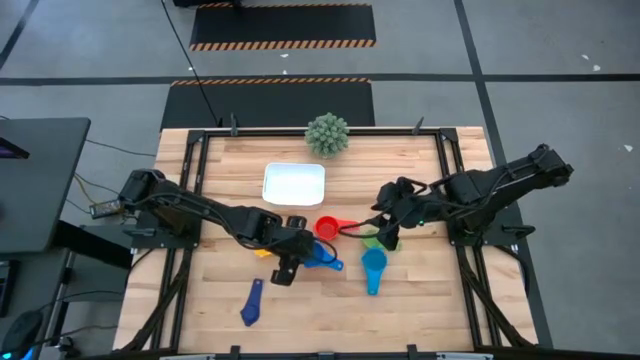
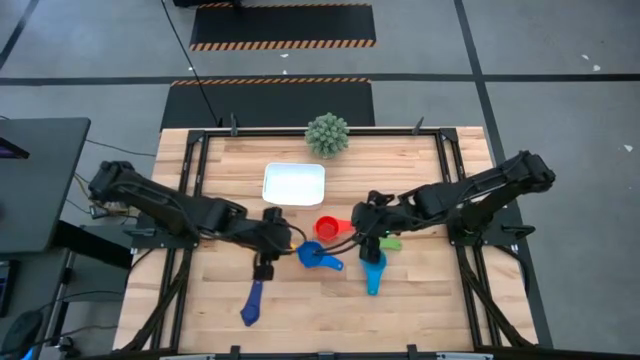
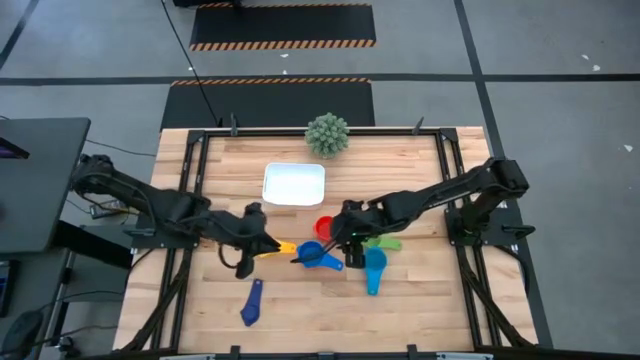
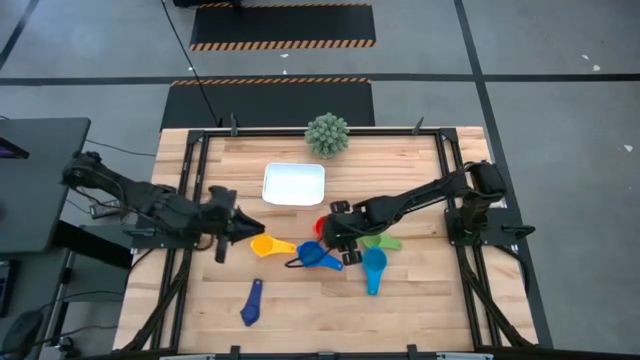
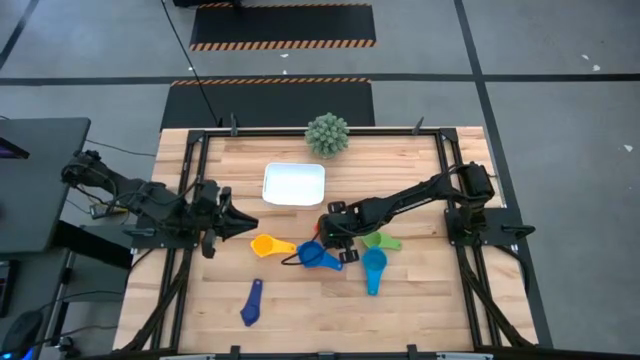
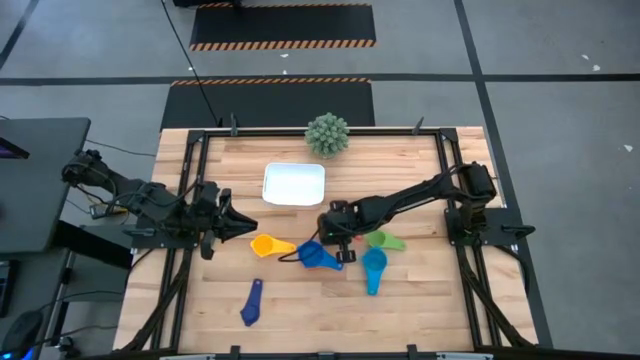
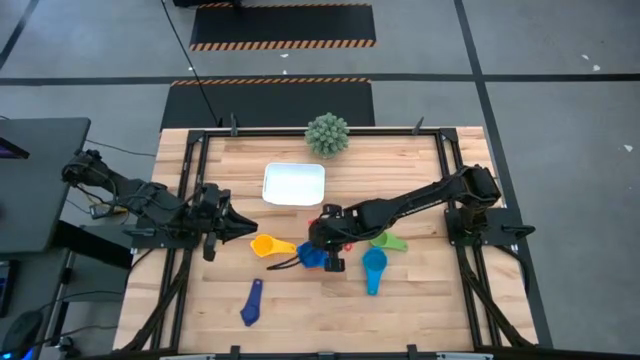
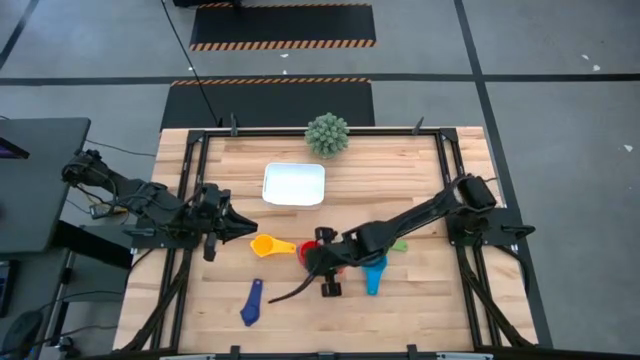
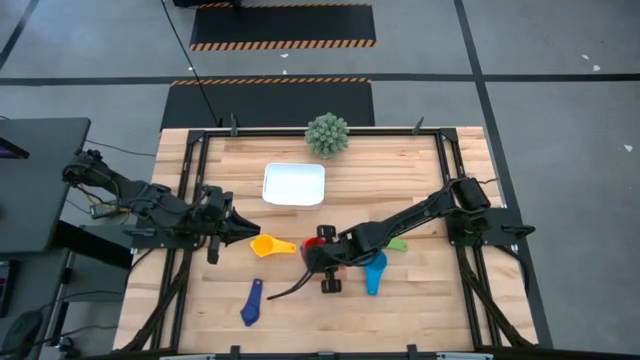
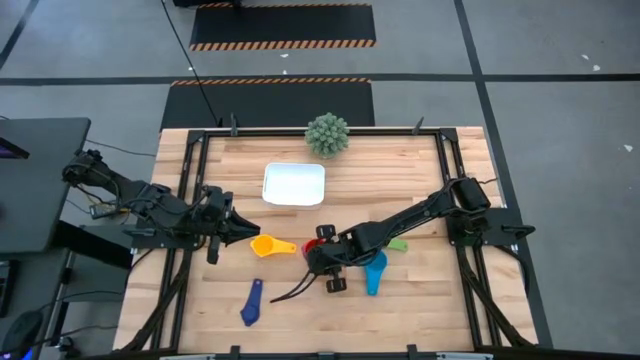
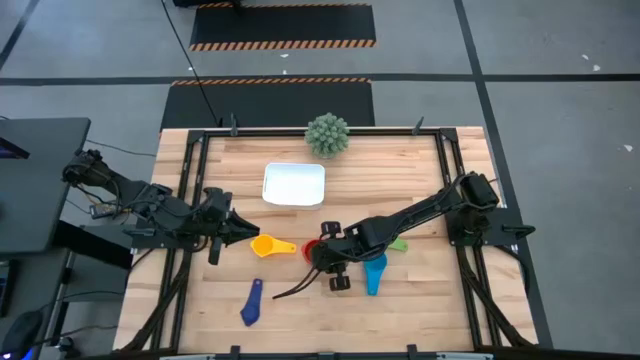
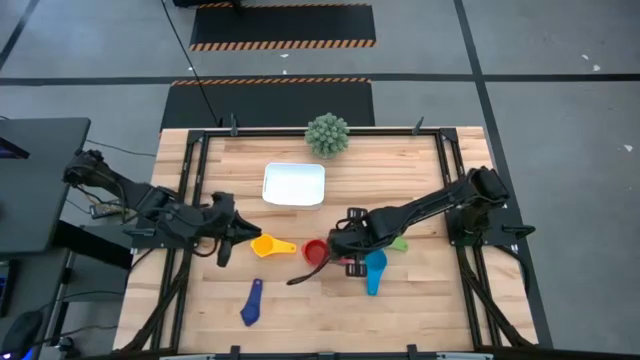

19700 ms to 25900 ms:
Task: Nest measuring cups in basket
Stack the red measuring cup on top of the light blue measuring cup

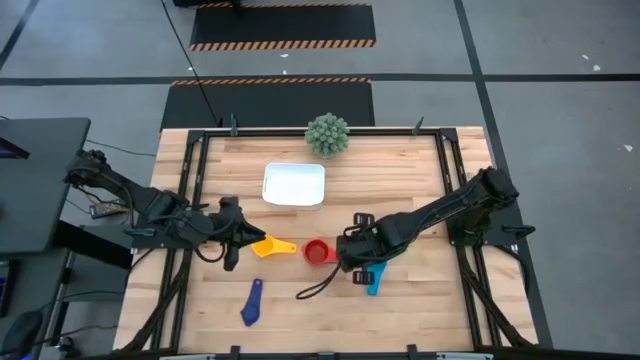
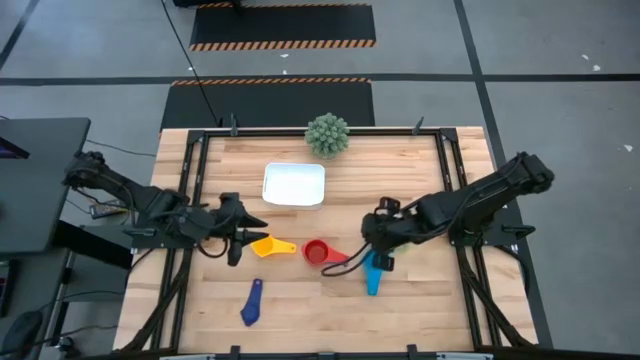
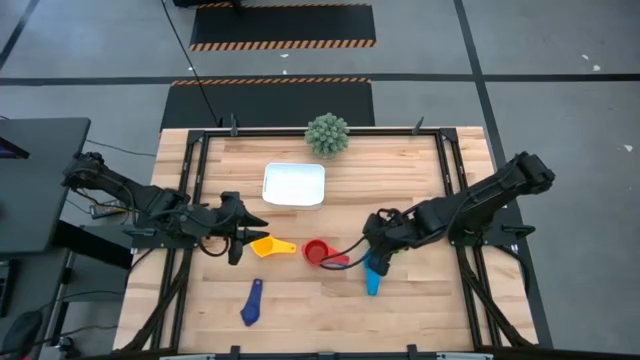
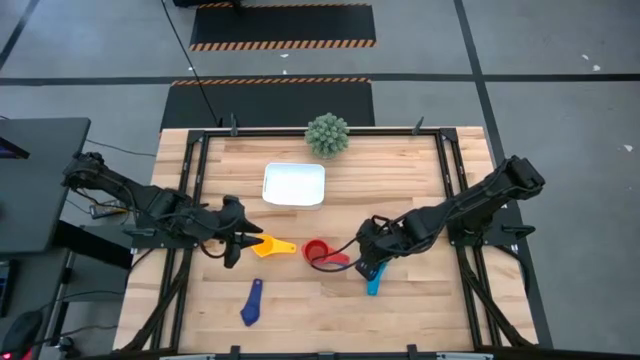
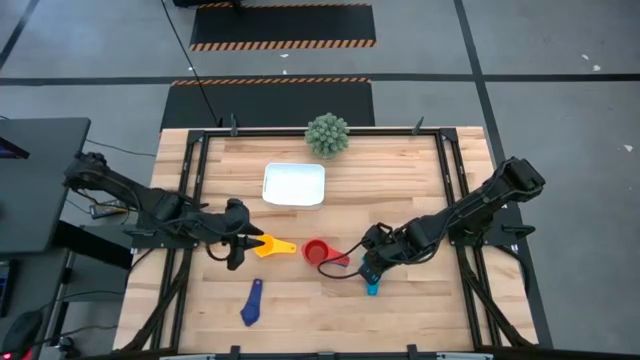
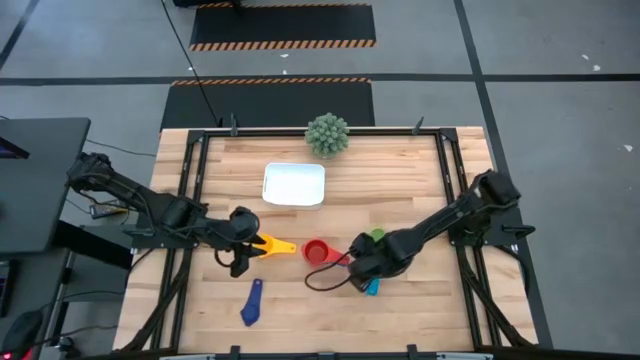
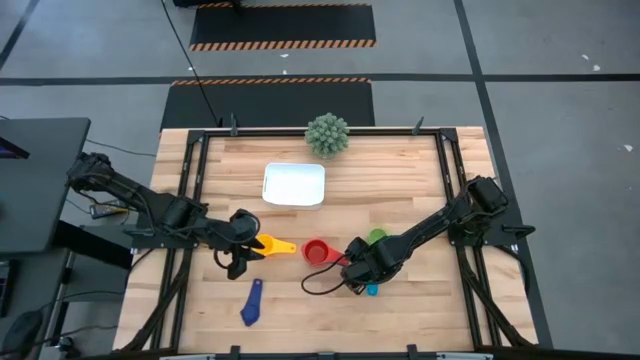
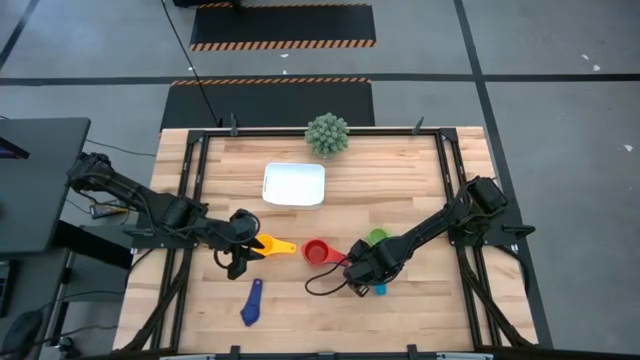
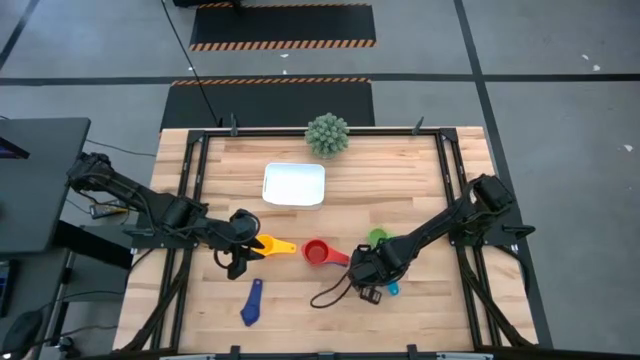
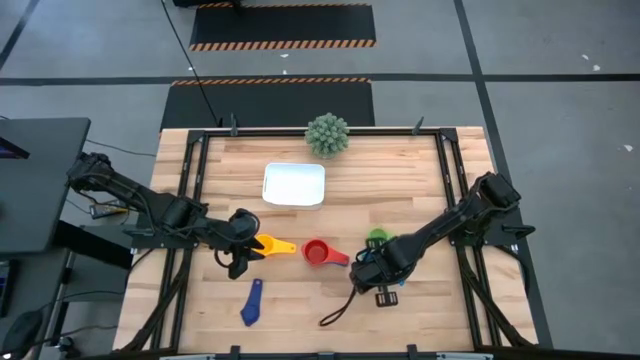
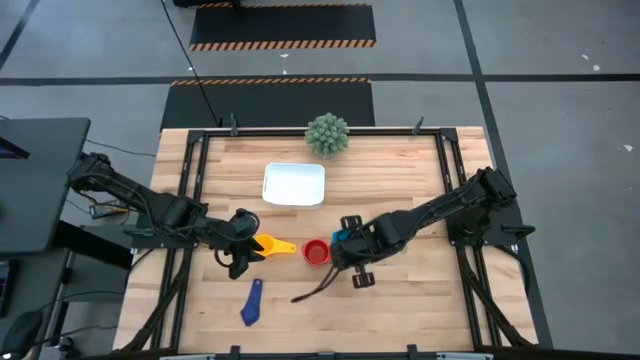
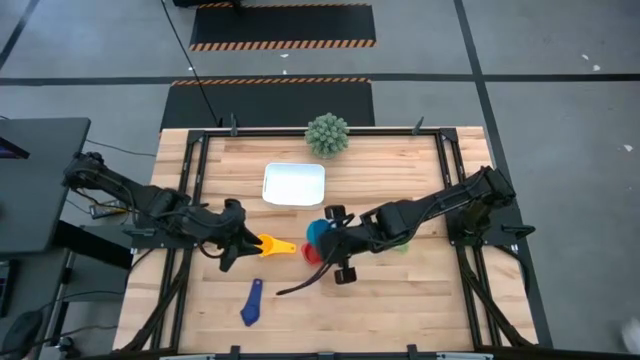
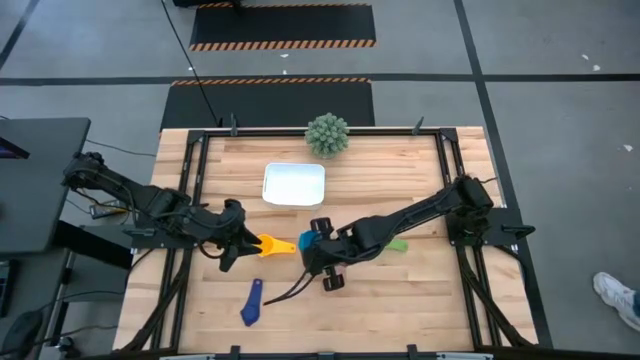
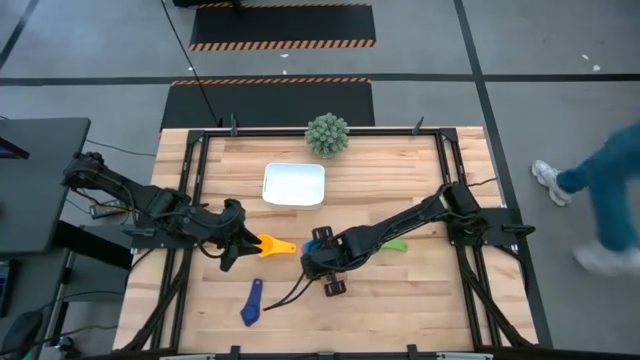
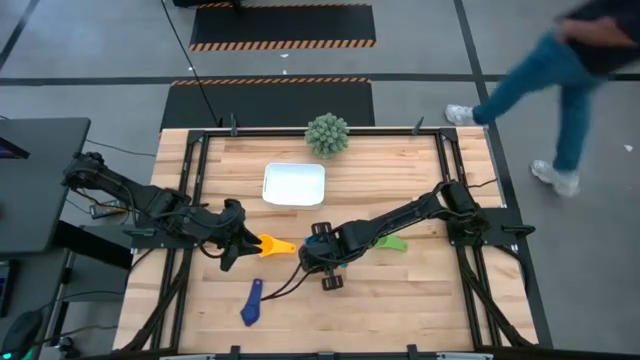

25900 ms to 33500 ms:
Stack the light blue measuring cup on top of the red measuring cup

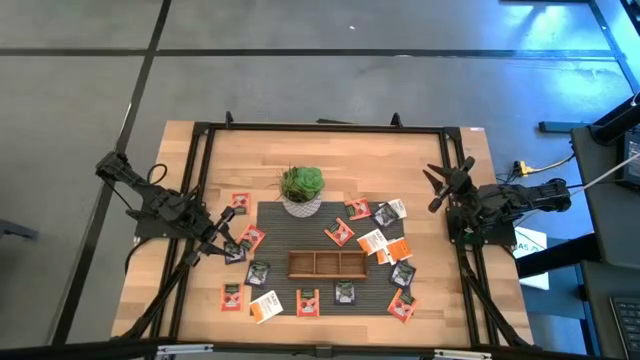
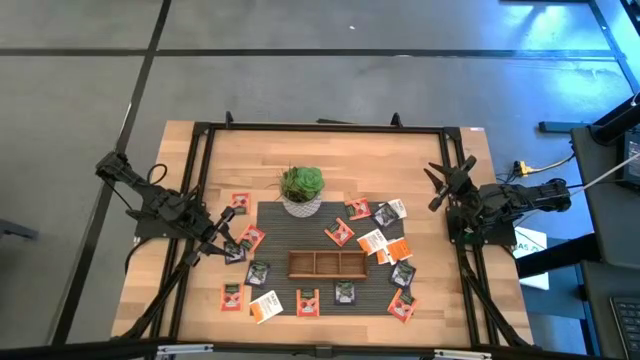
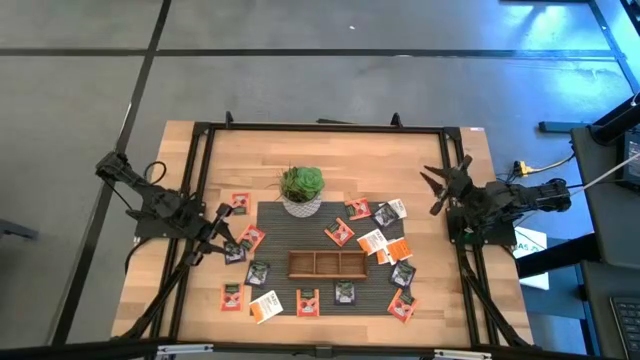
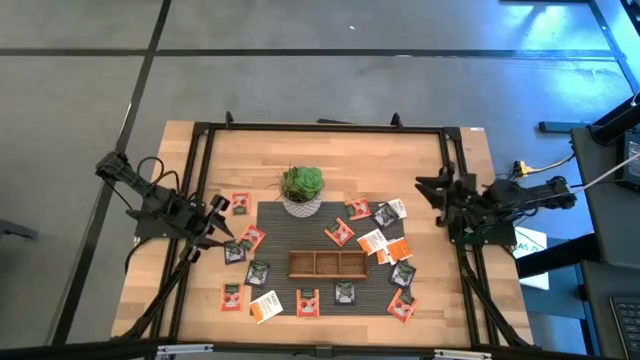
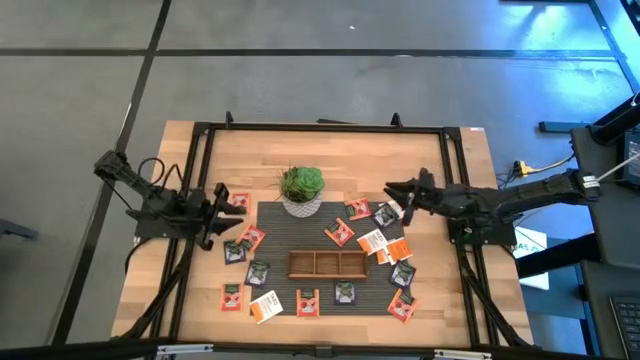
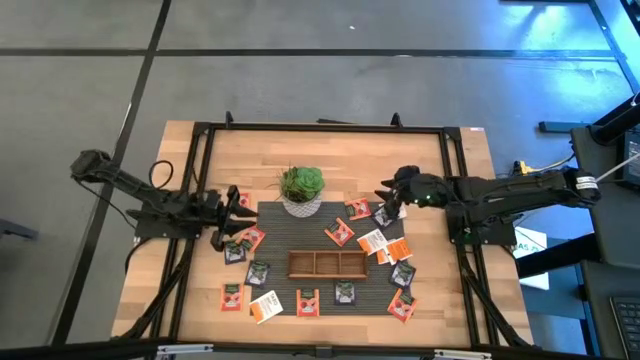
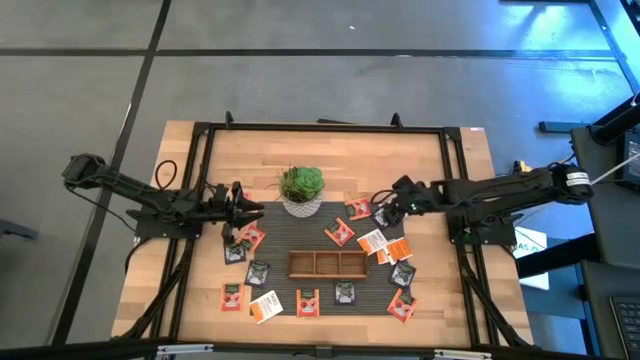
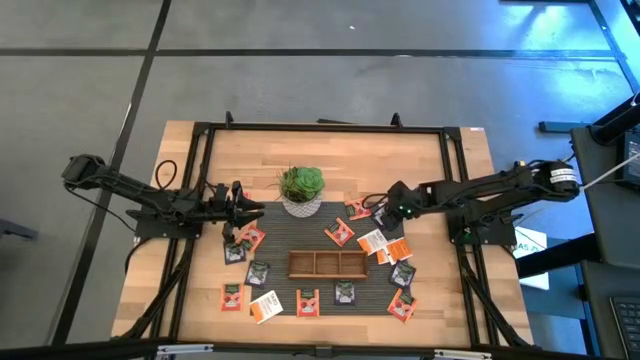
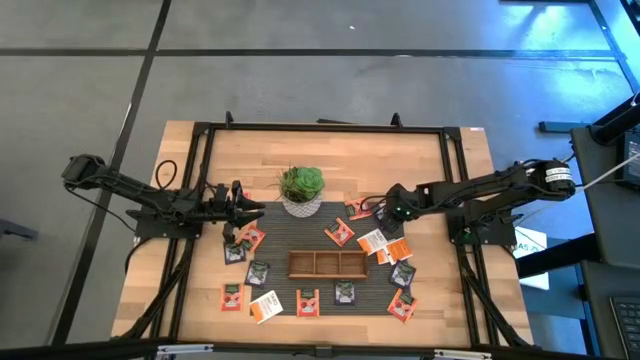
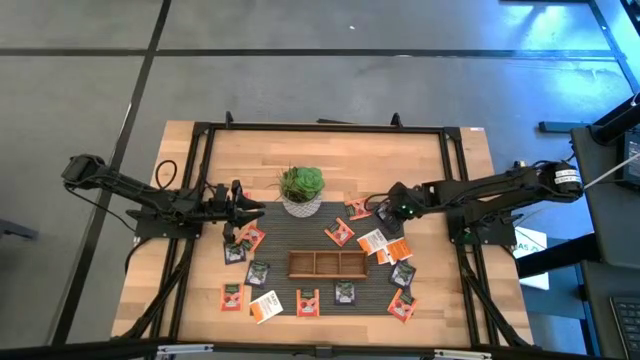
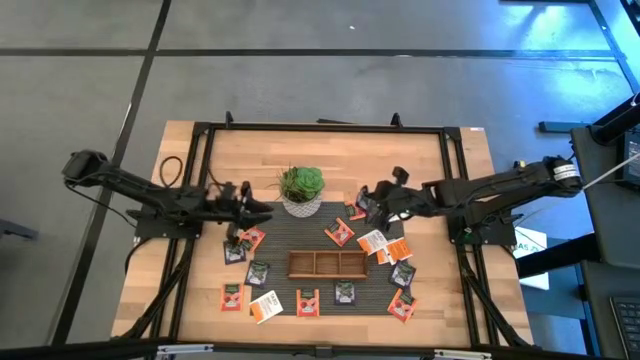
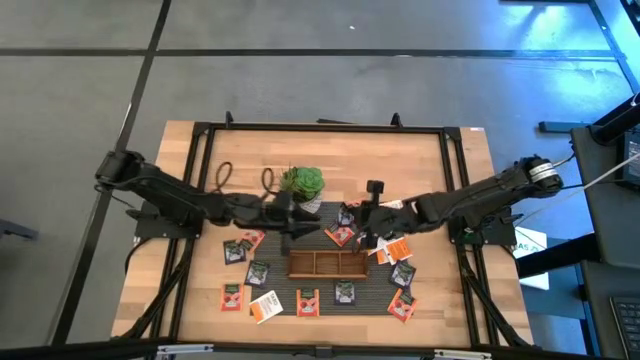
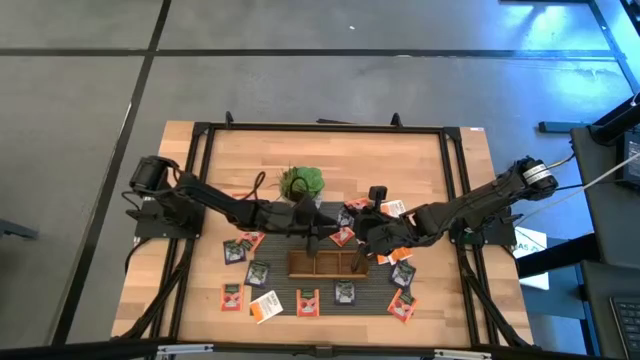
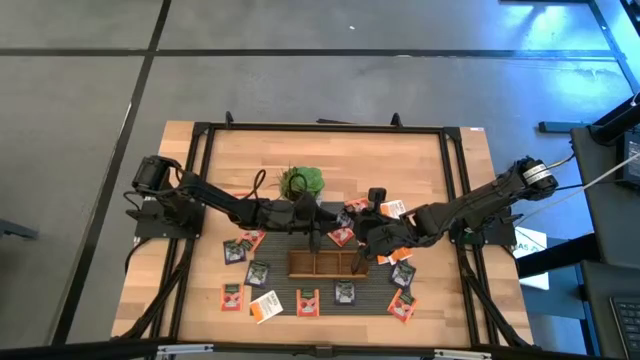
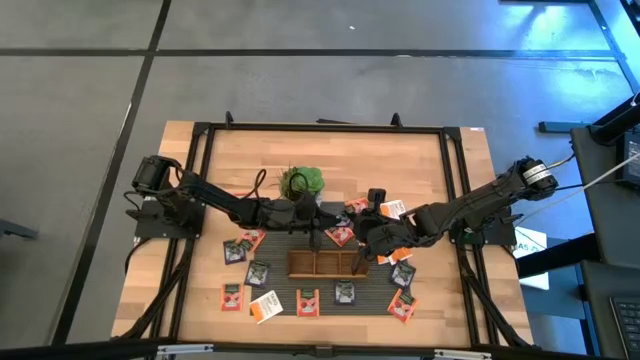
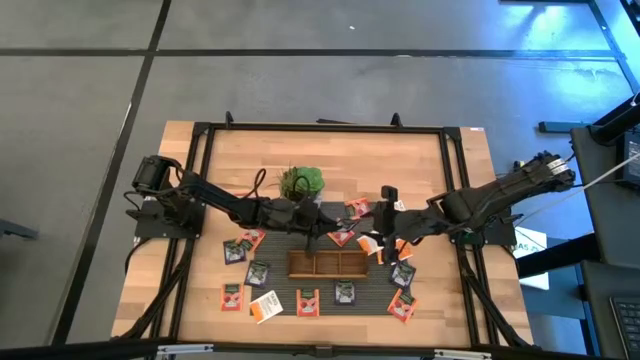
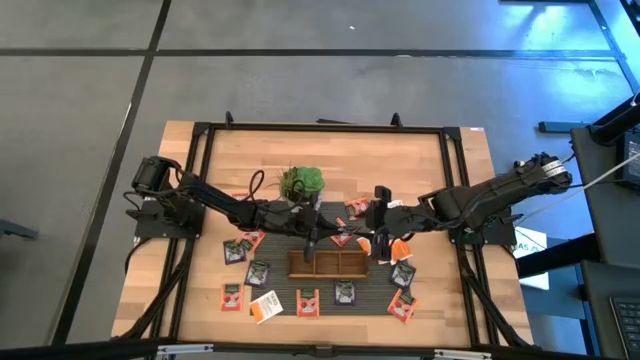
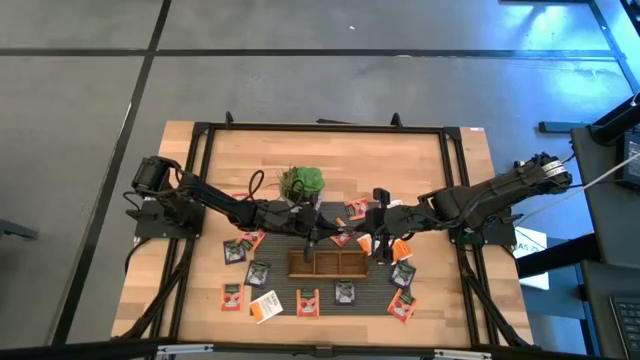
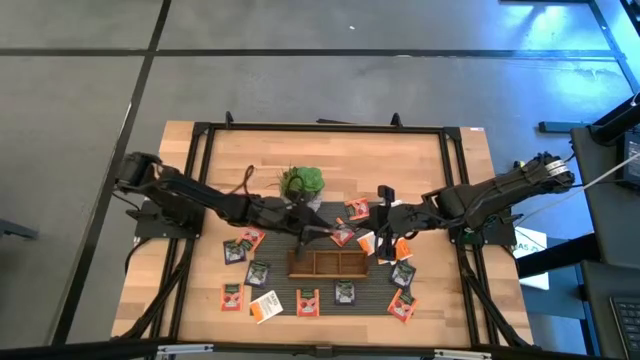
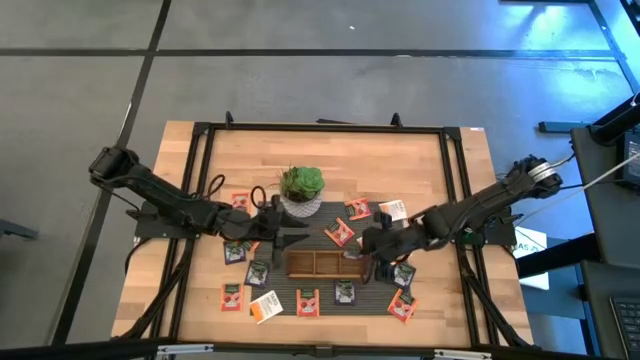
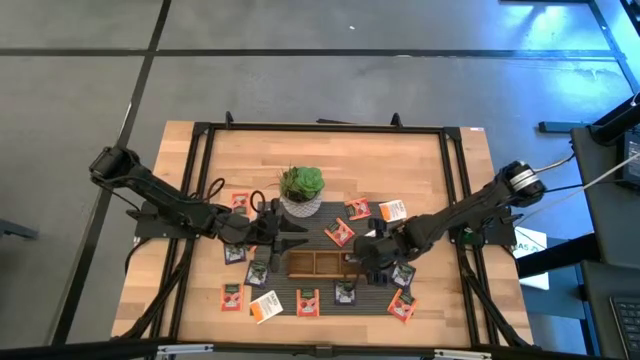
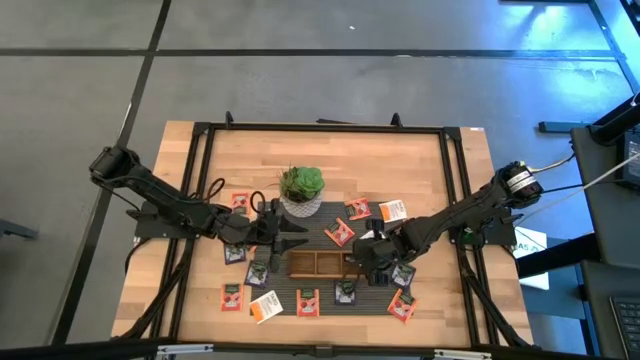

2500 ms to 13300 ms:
Task: Pick & Place Tea
Put the violet tea bag into the right section of the wooden organizer
